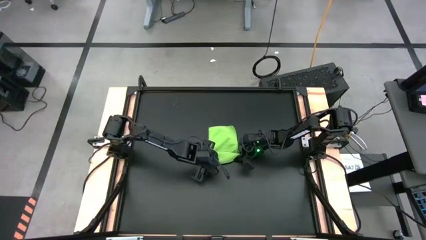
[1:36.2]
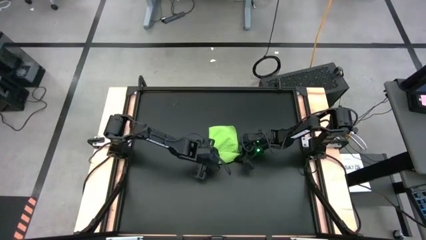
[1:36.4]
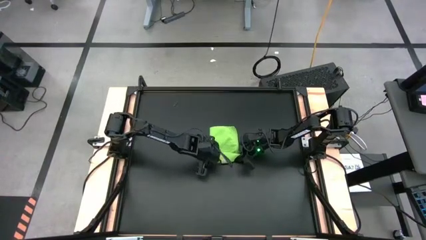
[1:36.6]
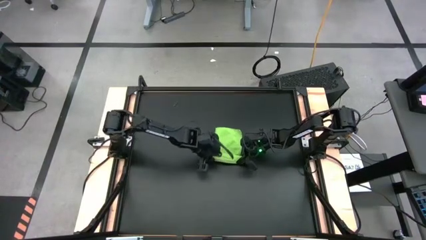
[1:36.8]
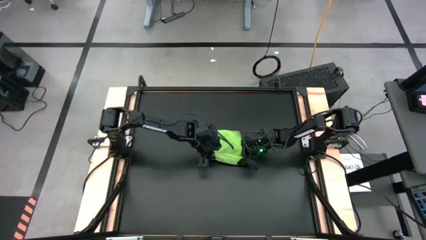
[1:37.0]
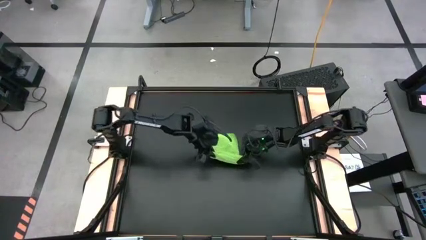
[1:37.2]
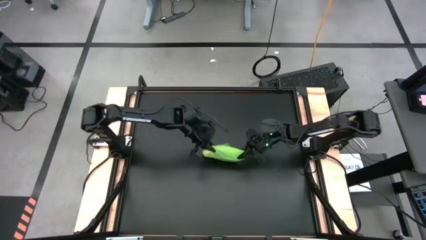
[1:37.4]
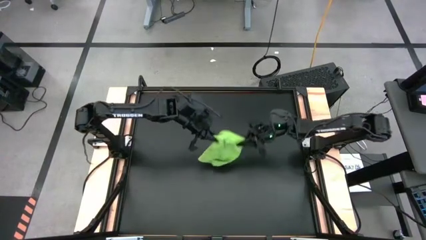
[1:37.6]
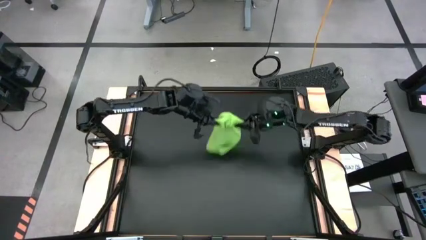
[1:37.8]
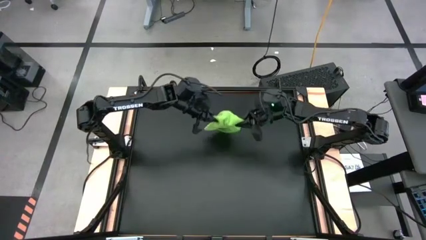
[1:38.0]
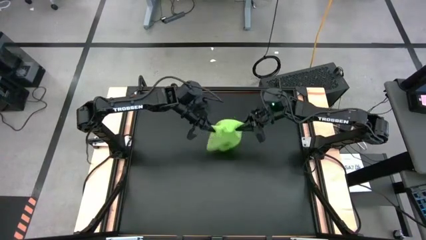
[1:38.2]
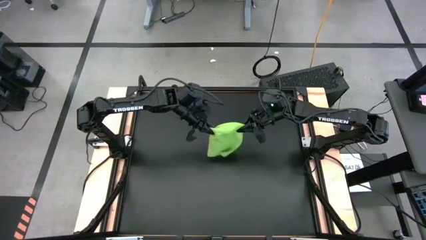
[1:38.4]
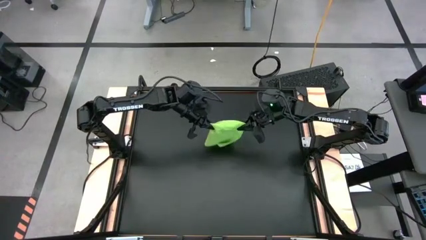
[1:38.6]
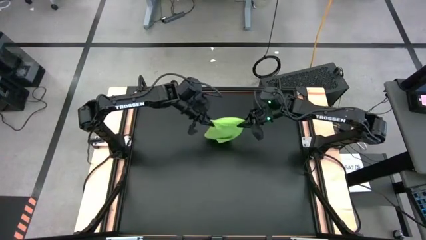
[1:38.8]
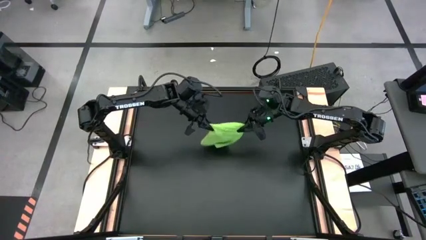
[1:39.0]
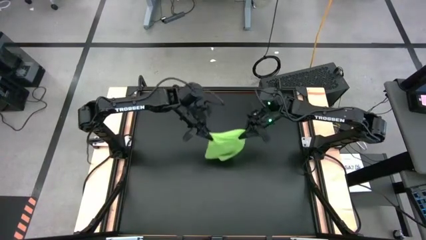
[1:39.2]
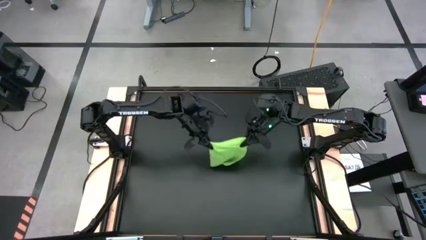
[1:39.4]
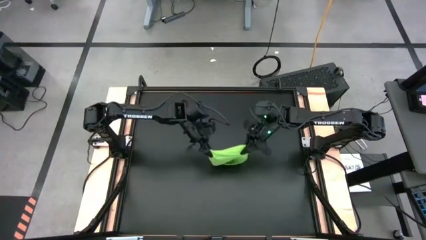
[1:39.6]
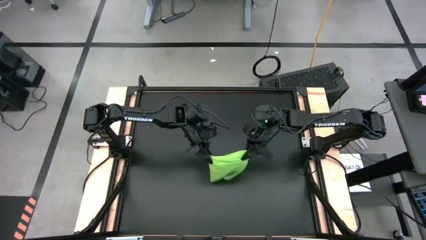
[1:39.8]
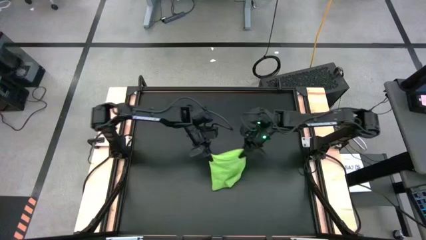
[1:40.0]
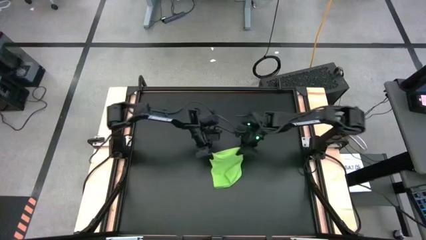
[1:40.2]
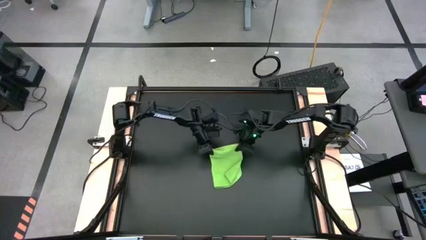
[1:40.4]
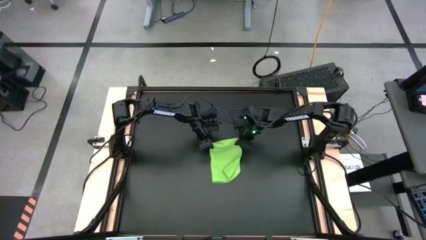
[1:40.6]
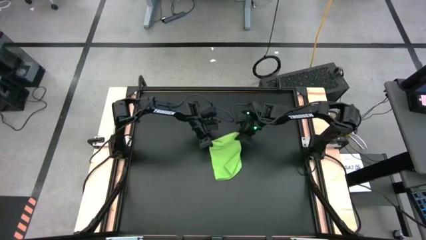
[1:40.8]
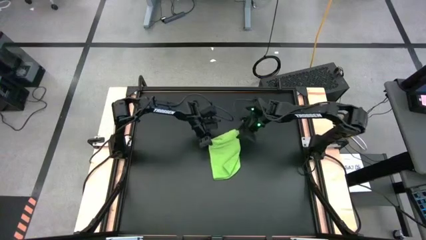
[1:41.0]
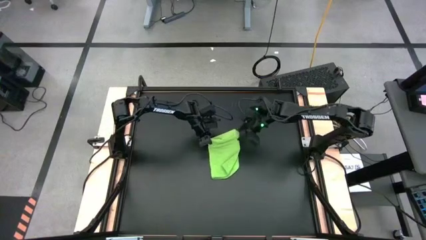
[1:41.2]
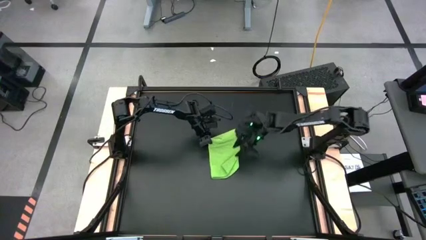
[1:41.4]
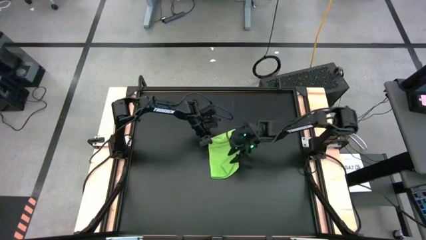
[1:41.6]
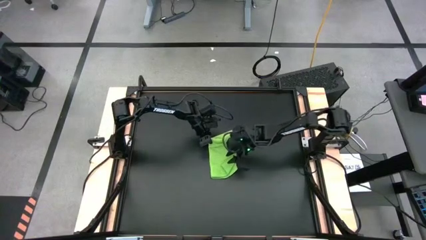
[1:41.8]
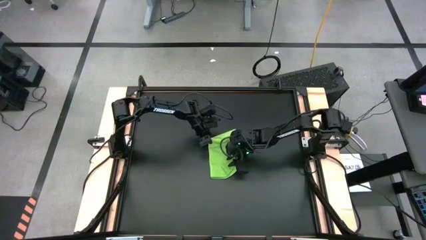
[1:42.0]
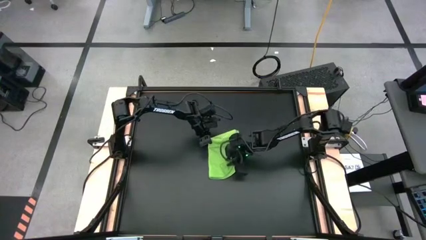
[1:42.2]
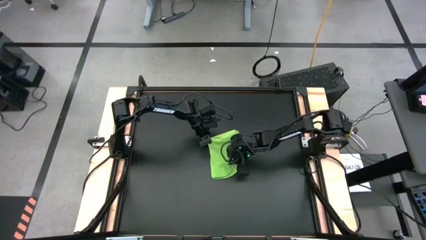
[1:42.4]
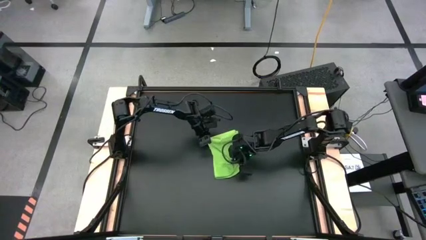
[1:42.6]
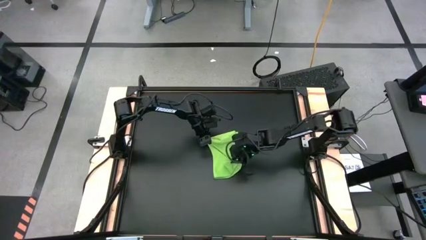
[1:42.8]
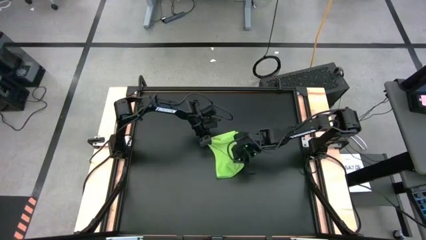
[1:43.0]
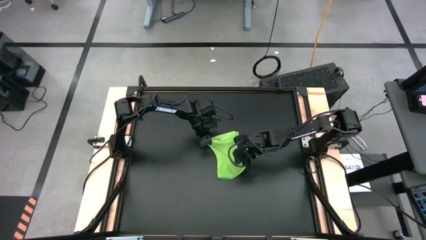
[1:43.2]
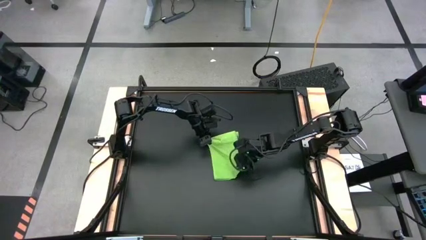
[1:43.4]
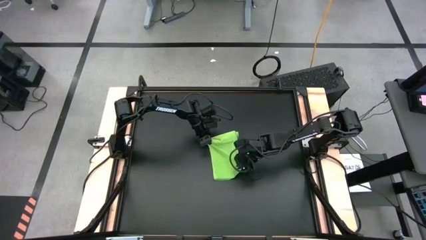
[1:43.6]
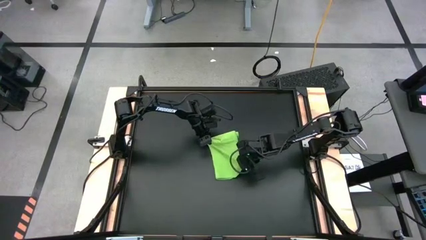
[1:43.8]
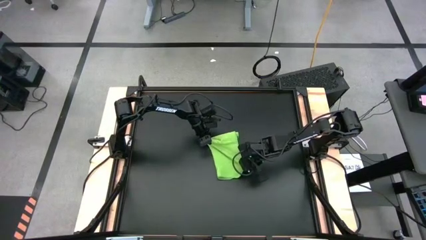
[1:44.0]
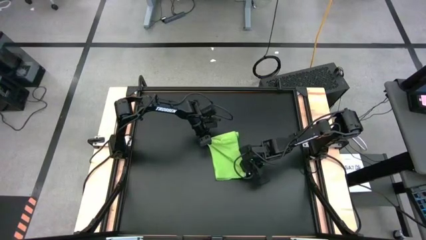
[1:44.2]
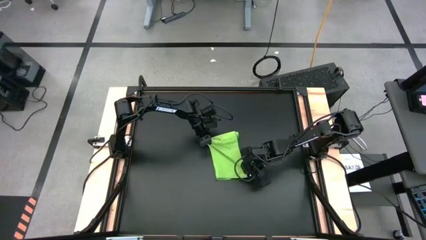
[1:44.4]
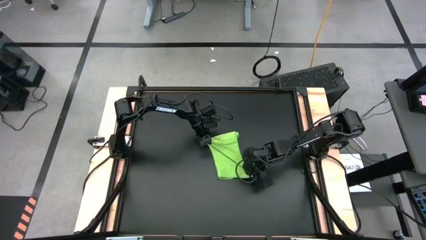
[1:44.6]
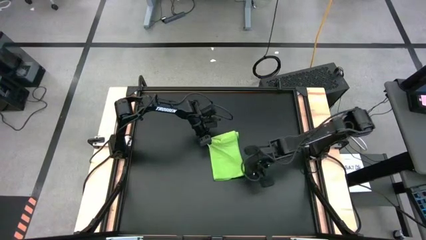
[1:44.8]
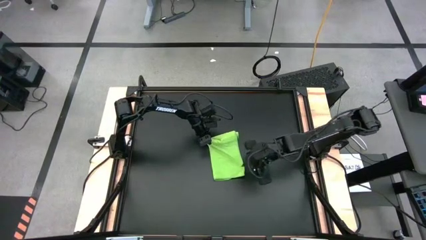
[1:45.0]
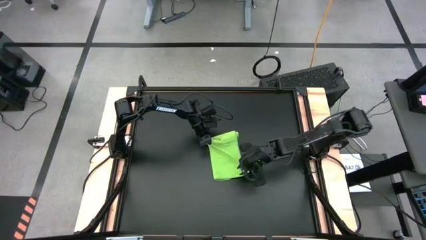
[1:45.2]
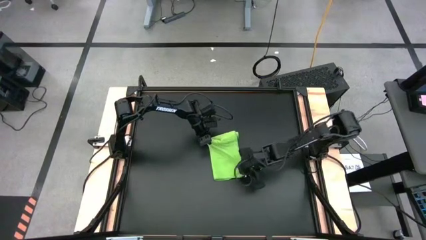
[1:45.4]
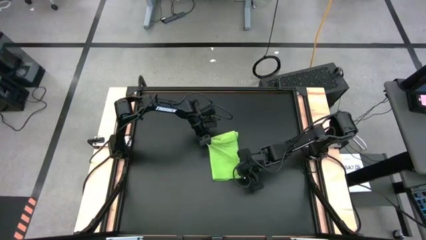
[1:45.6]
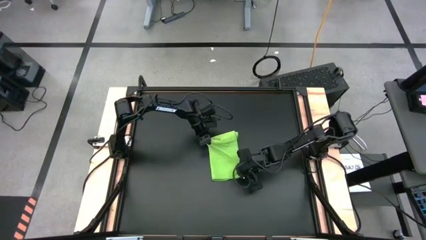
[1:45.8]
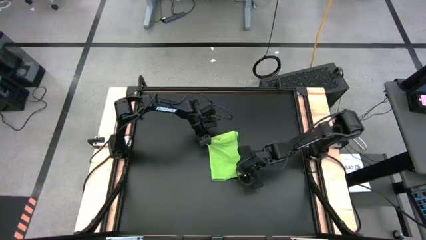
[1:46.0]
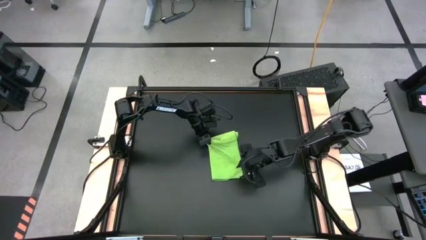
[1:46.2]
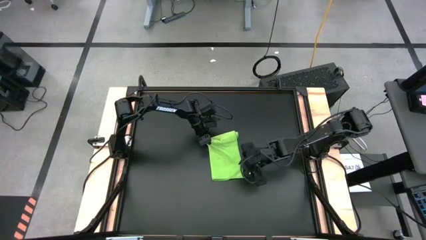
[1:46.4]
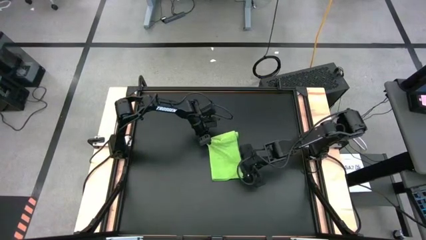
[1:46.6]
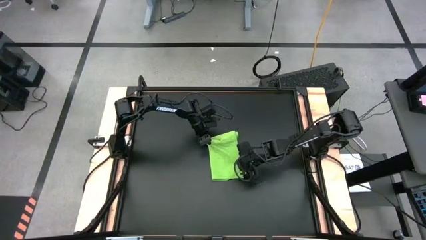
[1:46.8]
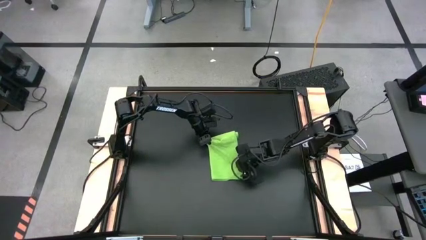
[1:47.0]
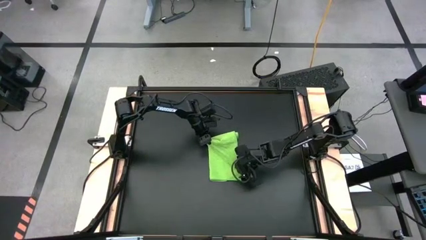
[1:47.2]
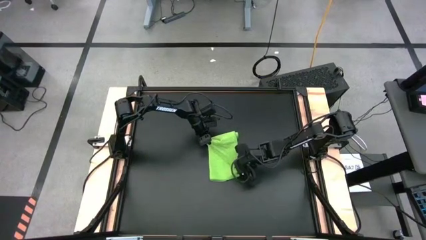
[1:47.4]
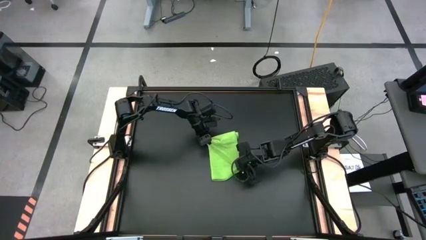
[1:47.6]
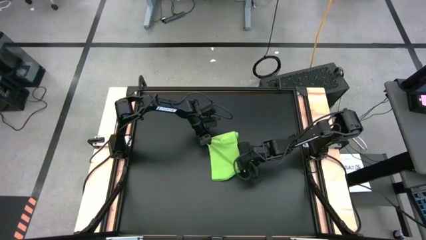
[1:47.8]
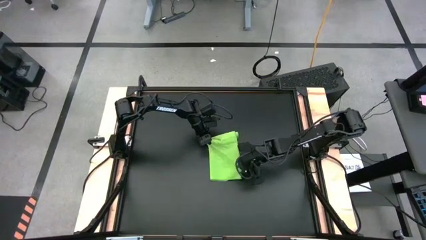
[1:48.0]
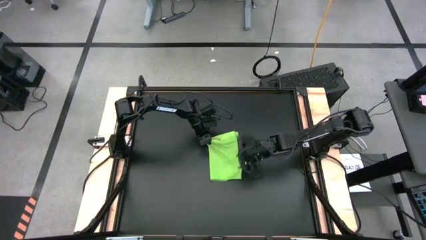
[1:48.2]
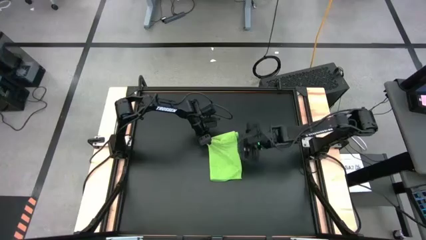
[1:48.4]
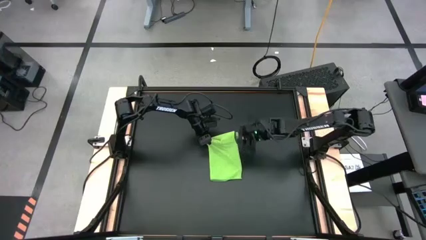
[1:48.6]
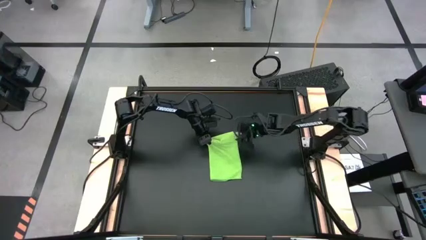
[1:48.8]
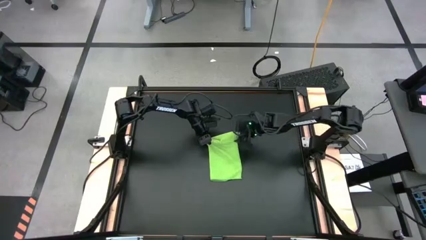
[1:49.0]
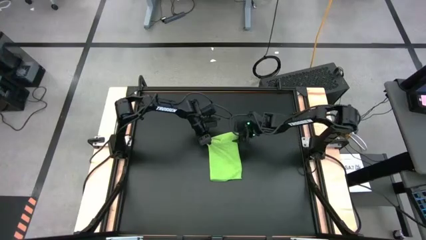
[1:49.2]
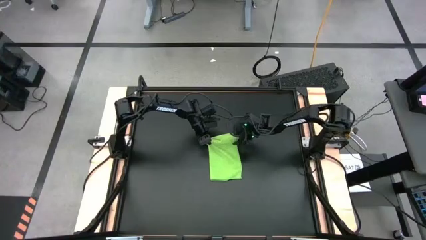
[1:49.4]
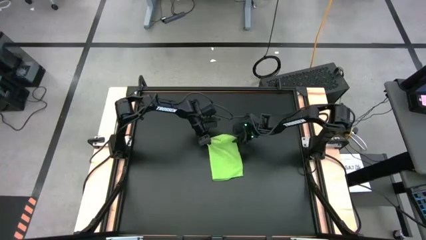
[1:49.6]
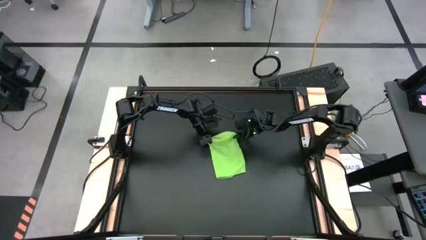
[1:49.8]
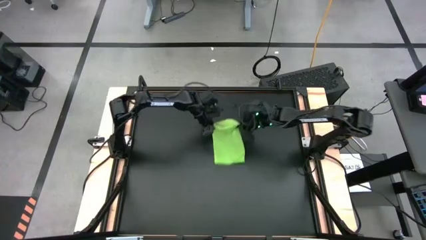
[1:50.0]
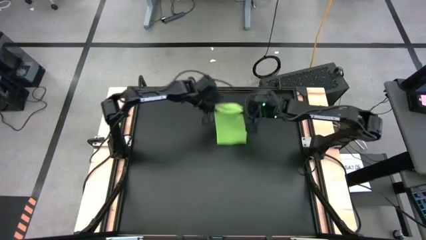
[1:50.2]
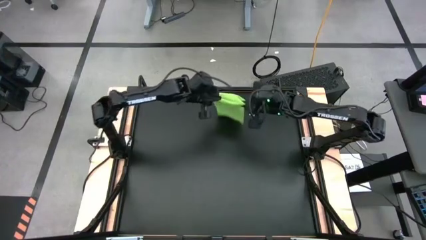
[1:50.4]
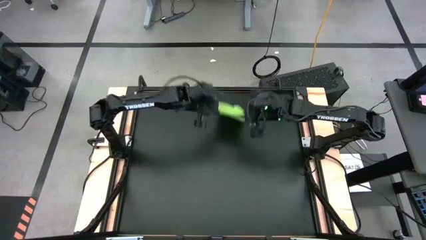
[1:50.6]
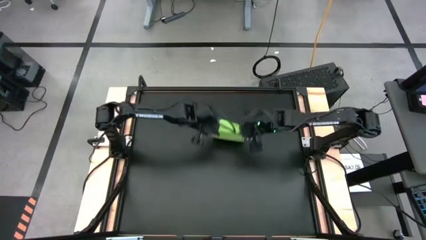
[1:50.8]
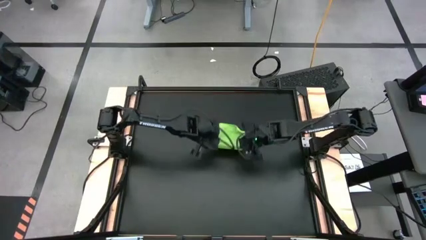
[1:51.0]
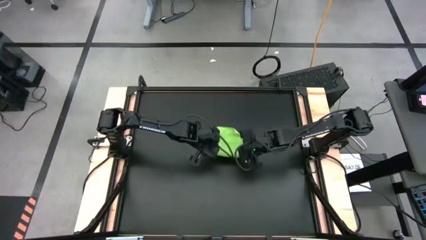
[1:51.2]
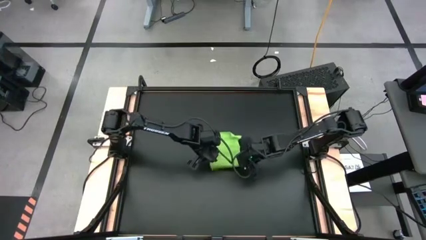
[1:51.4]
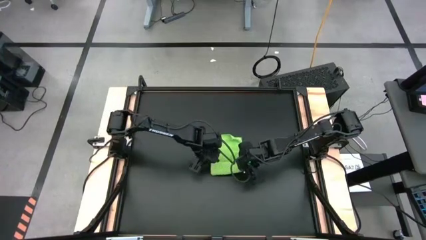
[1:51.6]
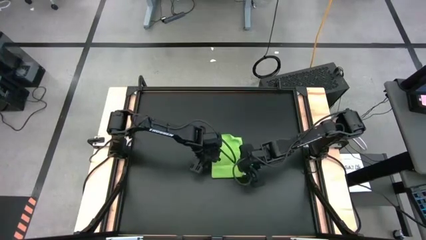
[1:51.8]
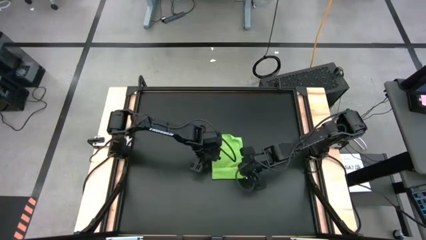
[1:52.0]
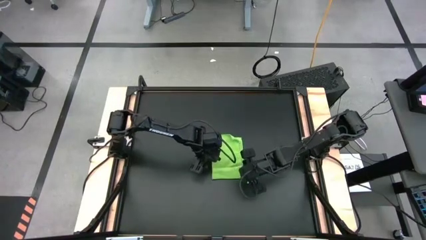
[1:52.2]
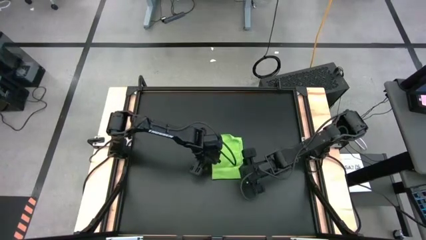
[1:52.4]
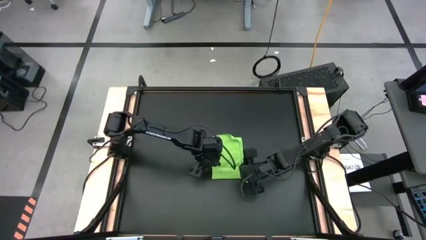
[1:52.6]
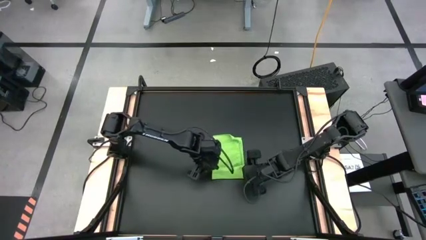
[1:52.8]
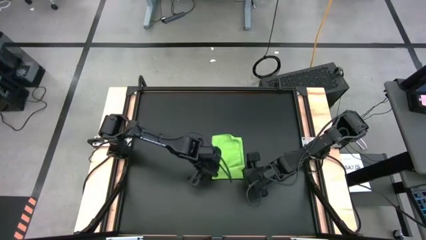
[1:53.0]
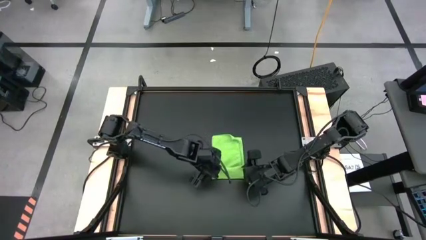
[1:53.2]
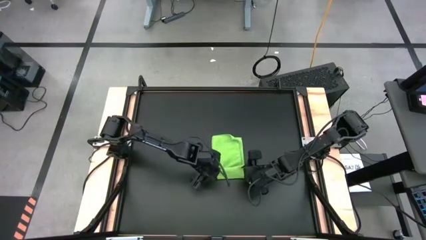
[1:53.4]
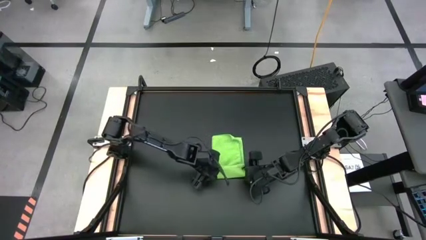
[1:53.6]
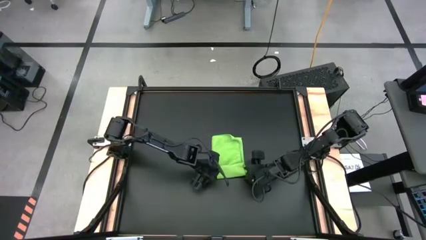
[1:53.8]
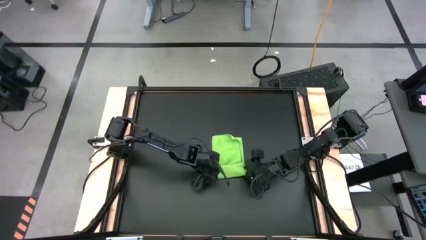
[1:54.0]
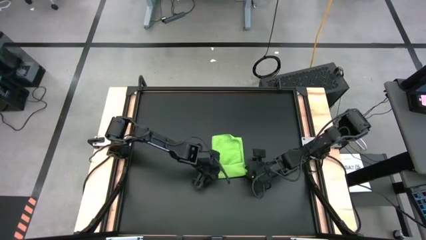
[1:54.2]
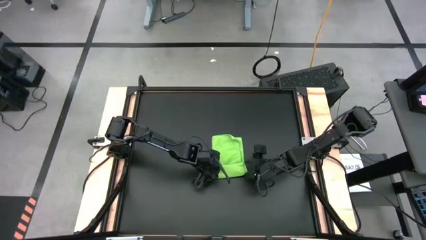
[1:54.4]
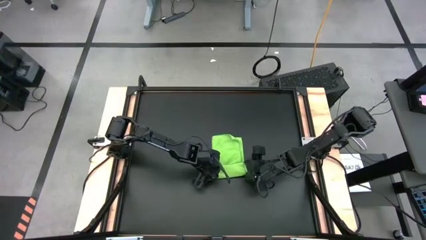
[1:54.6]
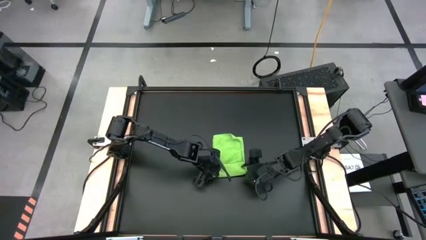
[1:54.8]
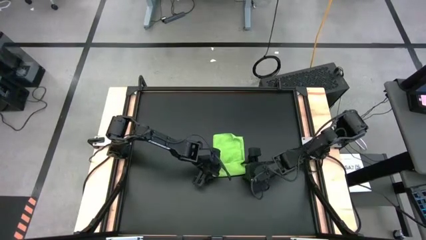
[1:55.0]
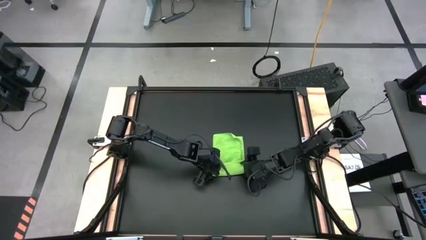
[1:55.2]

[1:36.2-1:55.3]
Task: Roll towel into tight, uniform cylinder
Roll the green towel
